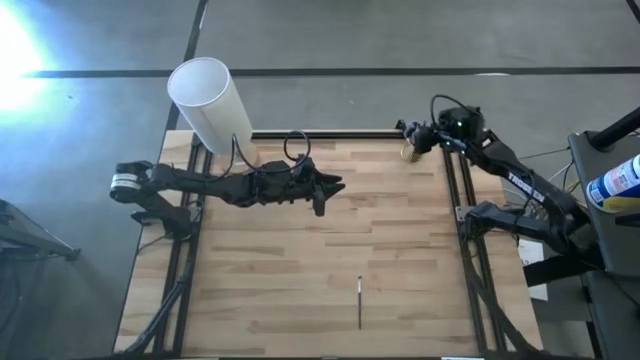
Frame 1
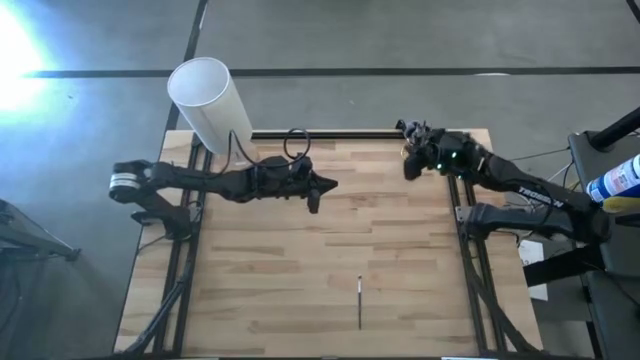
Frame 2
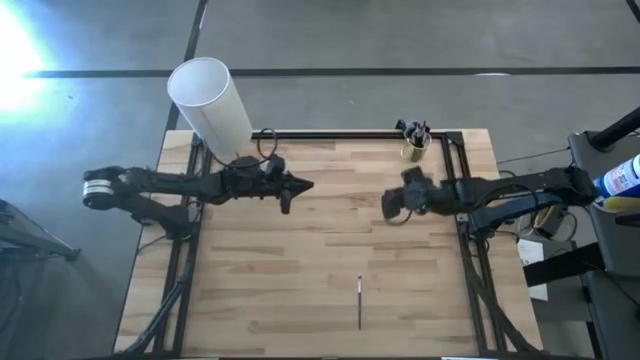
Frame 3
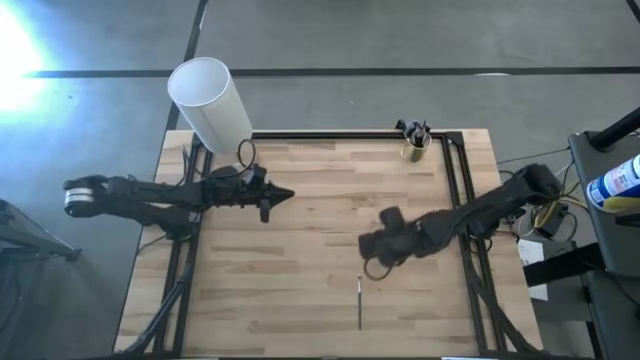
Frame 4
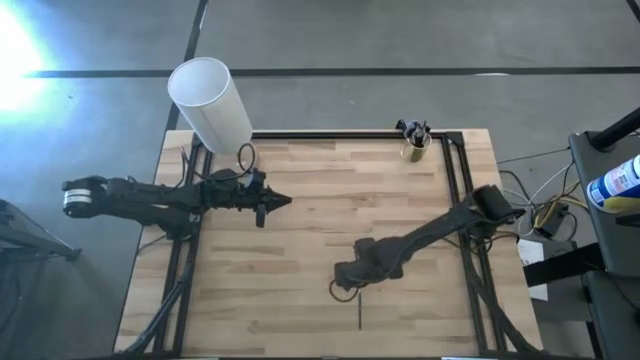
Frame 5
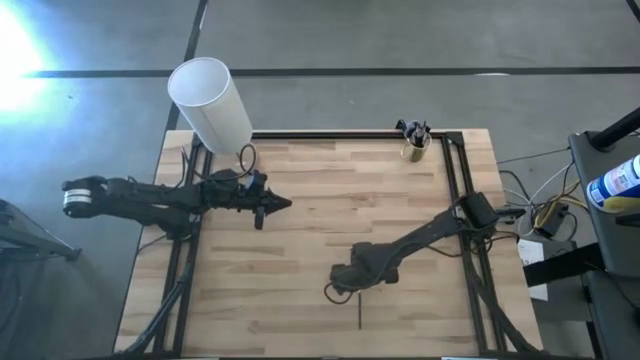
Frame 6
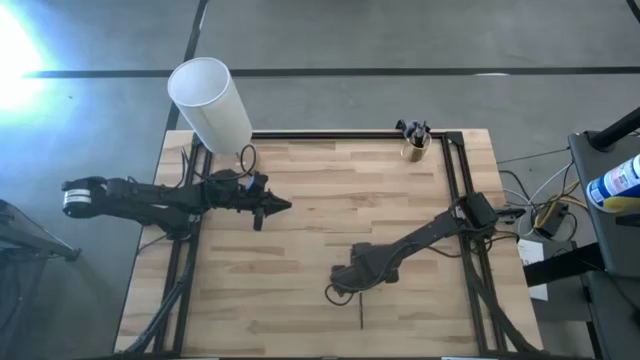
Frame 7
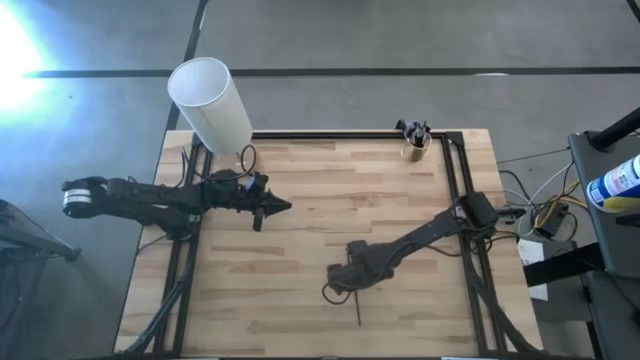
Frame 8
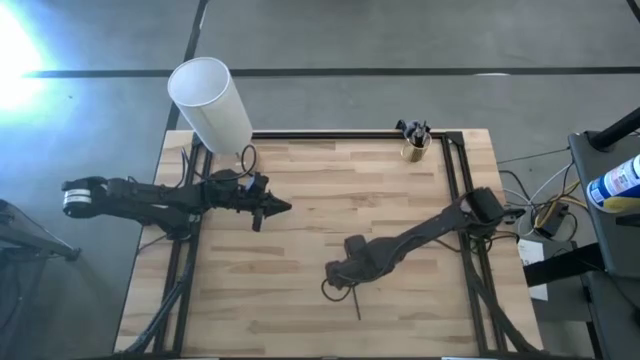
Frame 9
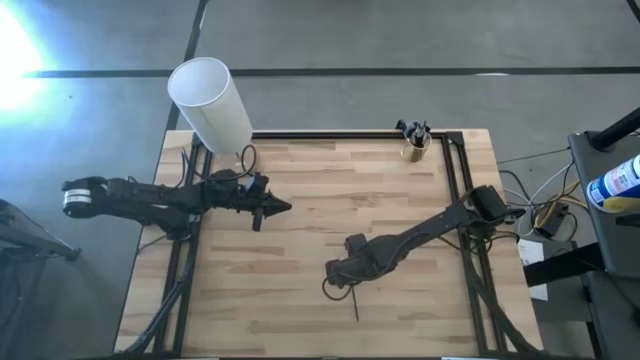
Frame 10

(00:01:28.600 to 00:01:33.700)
Task: Put items in baskets/containers
Put the eyeshadow brush into the yellow container

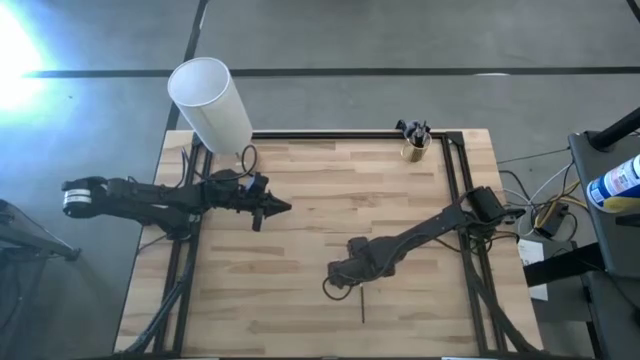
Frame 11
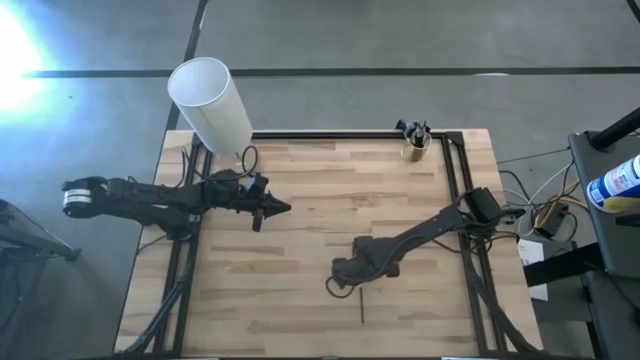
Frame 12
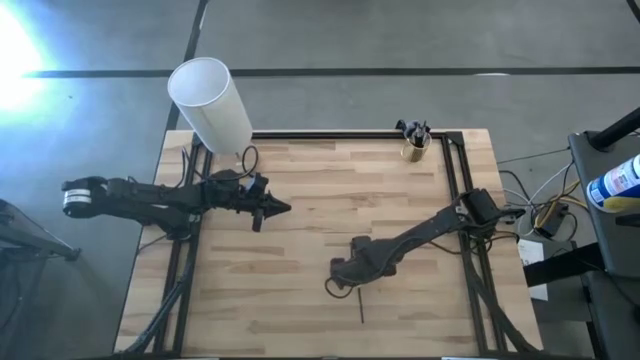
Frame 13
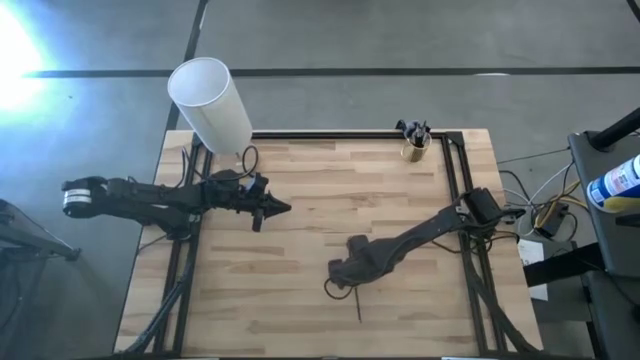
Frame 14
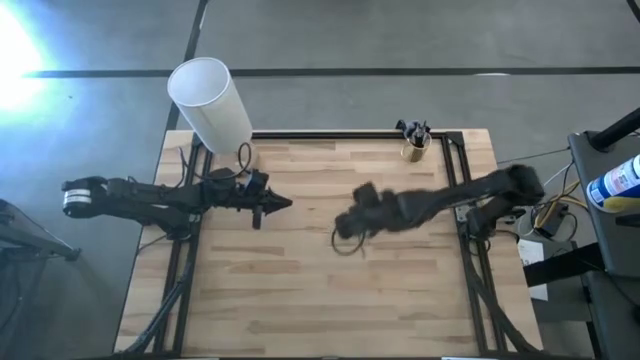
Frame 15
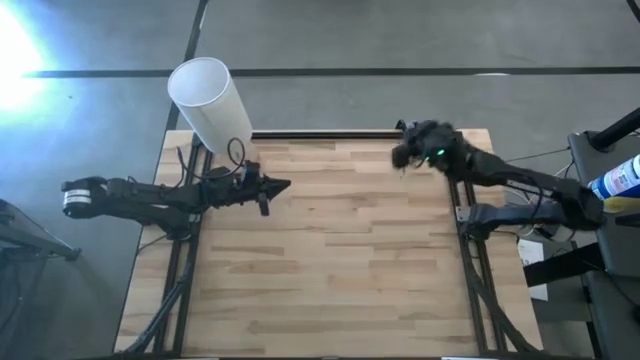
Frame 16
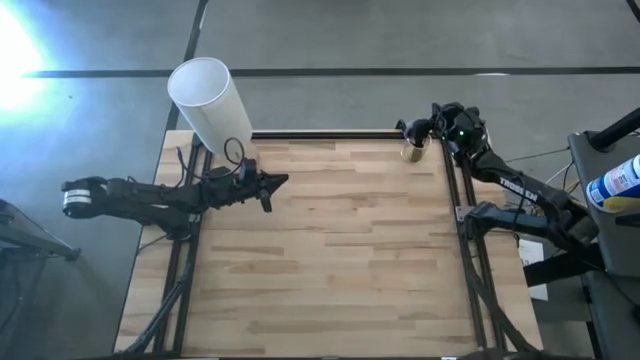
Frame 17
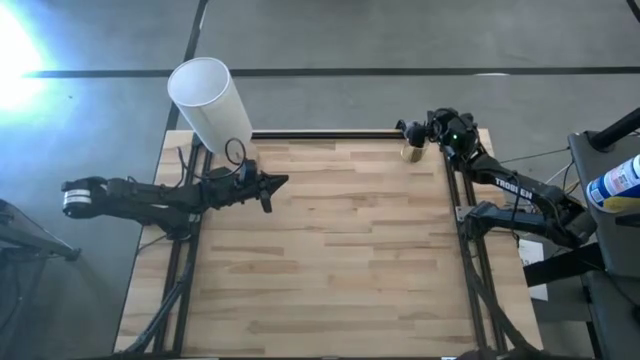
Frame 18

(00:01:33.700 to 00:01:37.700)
Put the eyeshadow brush into the yellow container

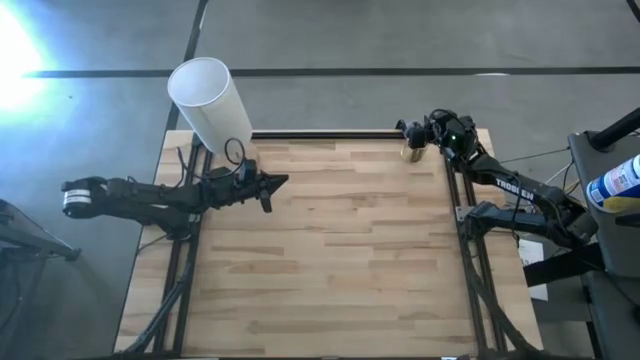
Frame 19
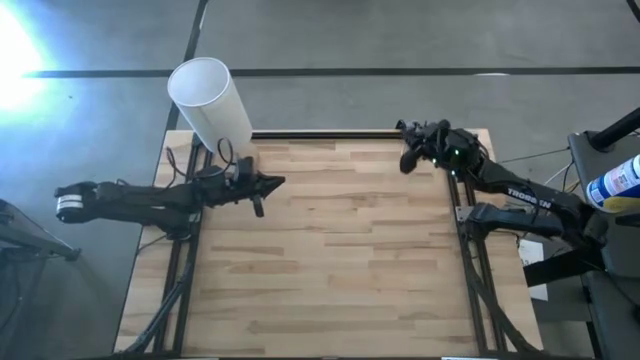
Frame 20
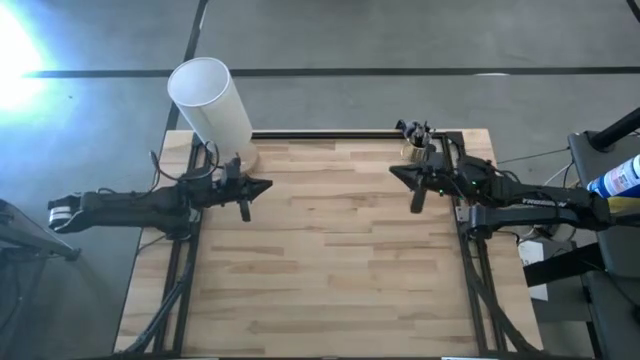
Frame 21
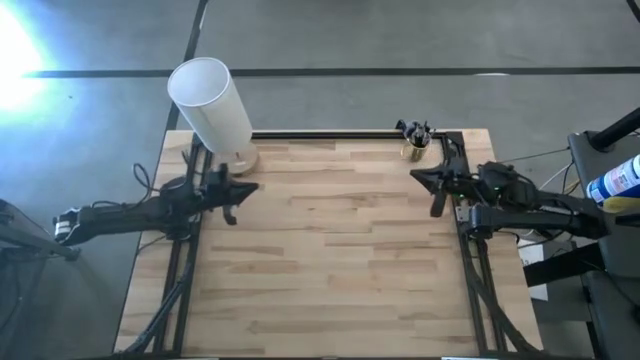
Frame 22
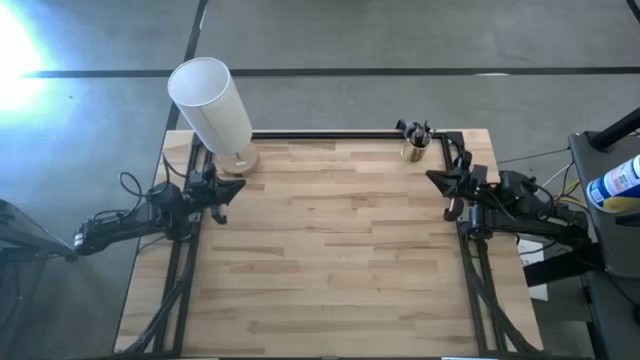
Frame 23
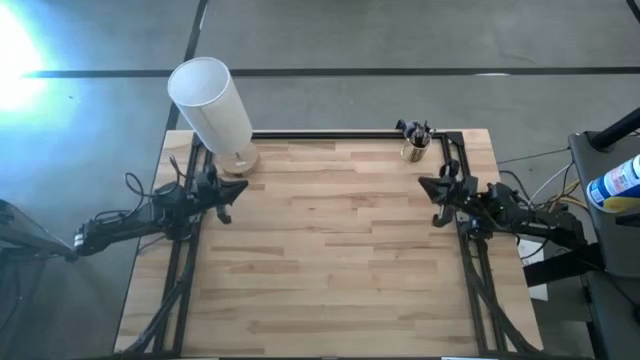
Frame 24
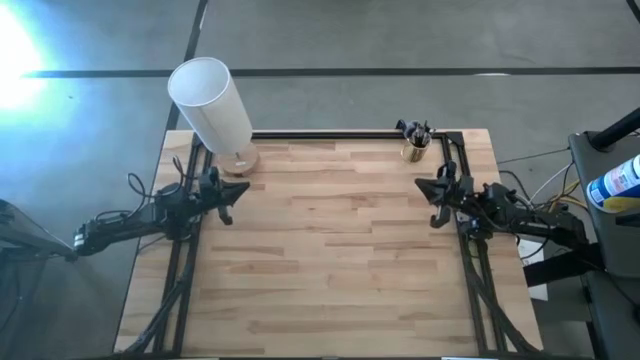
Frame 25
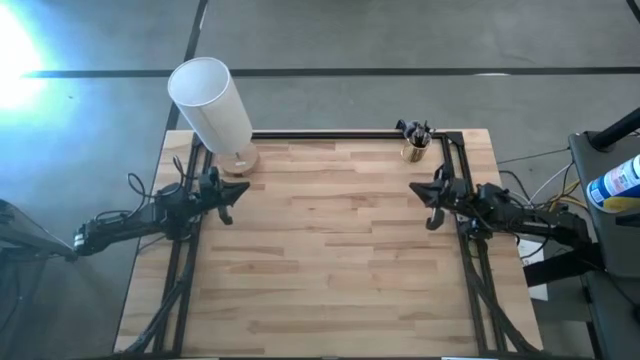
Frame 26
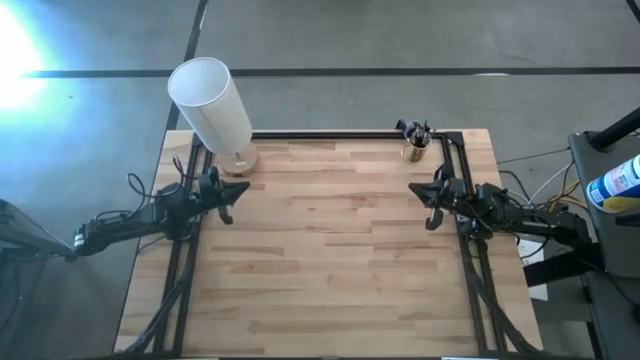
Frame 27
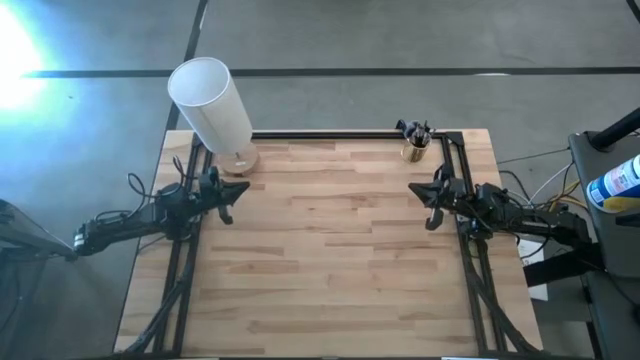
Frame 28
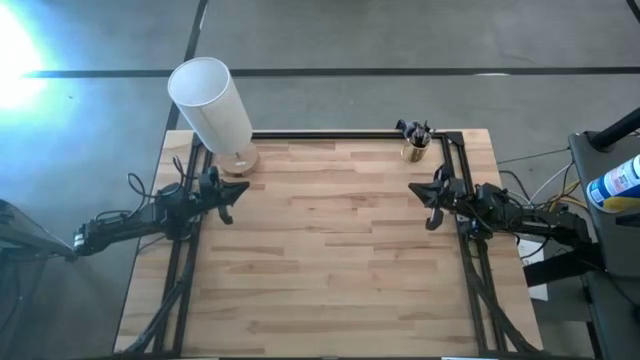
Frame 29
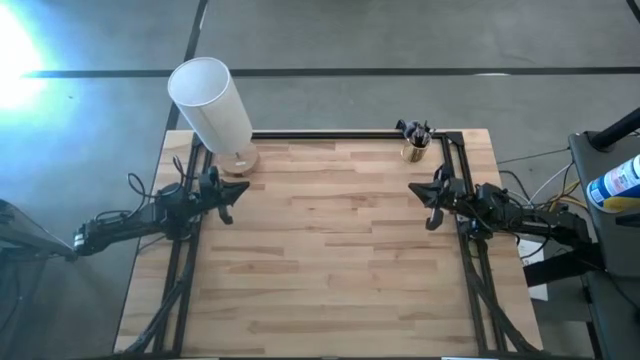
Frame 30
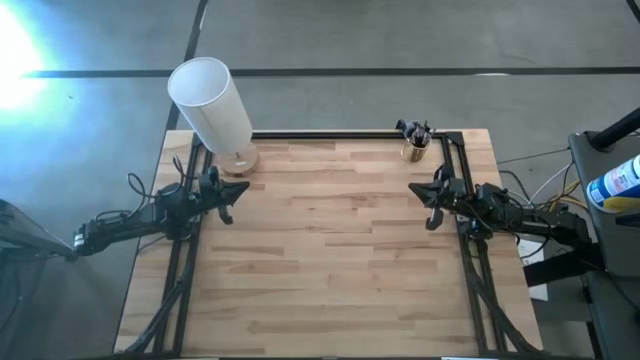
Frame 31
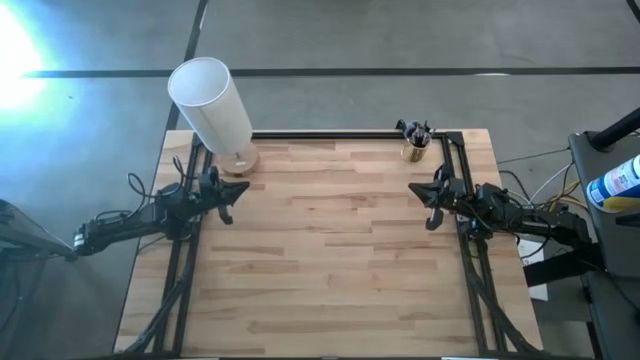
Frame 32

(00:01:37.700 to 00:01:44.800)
Return to Home Position

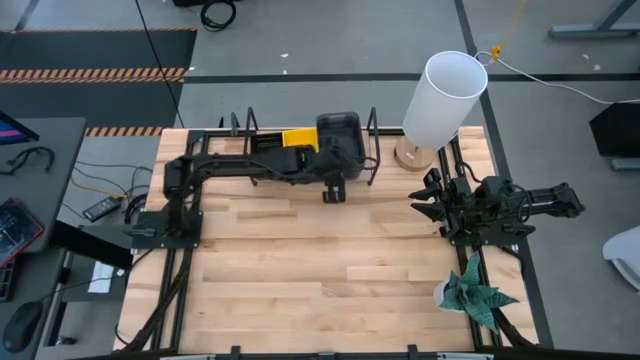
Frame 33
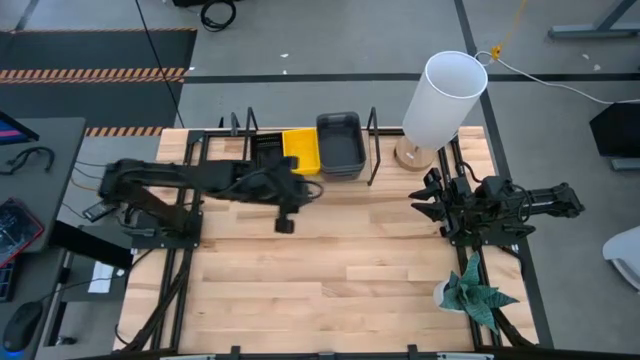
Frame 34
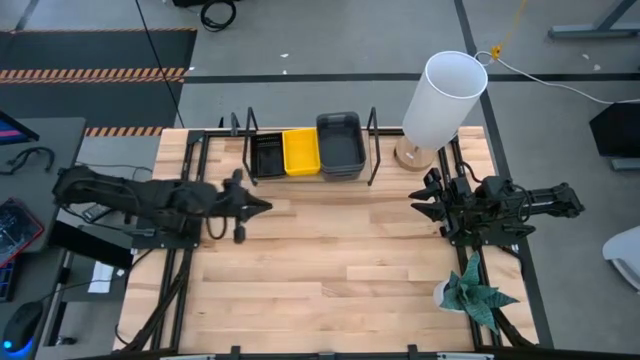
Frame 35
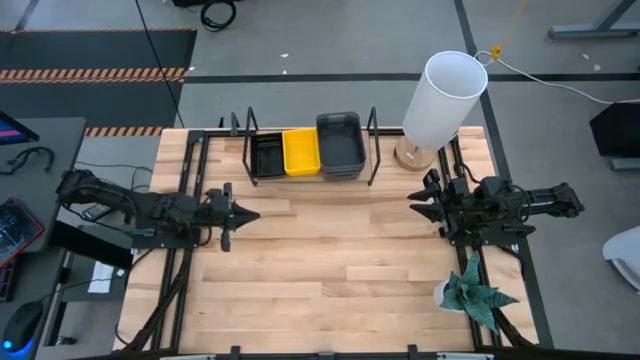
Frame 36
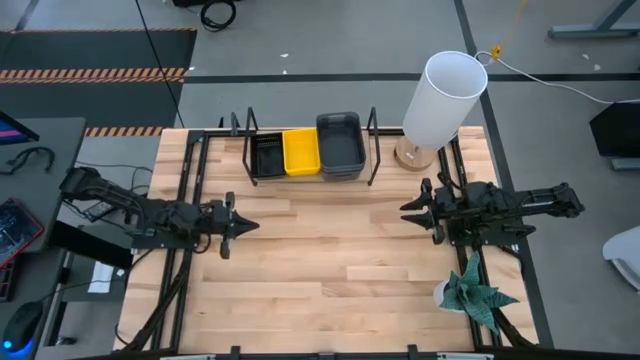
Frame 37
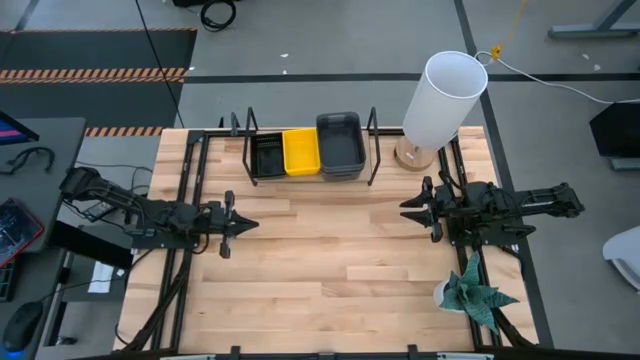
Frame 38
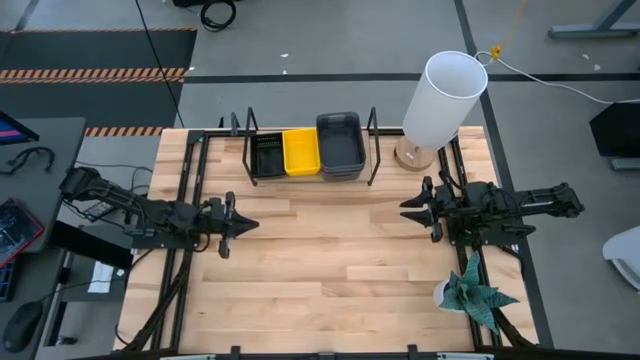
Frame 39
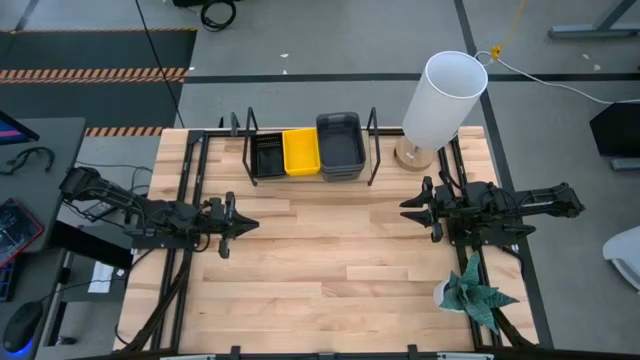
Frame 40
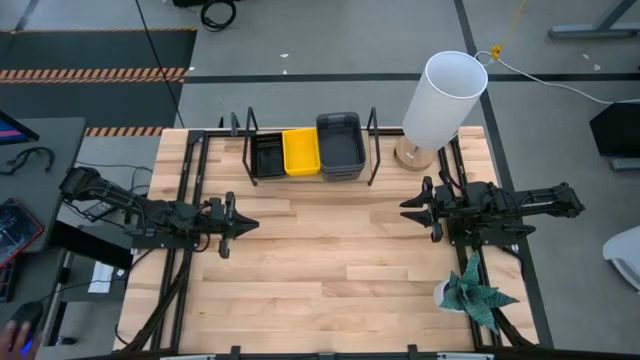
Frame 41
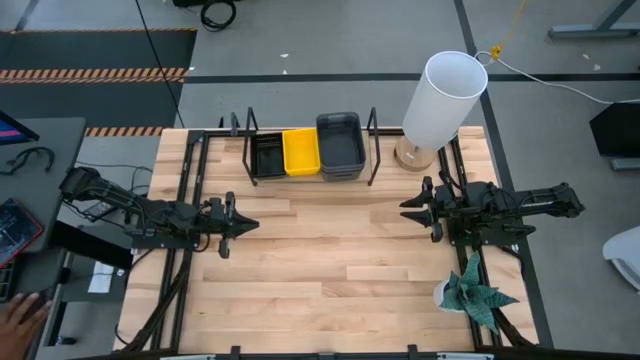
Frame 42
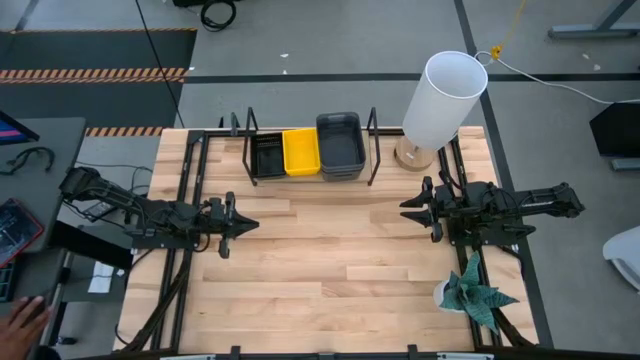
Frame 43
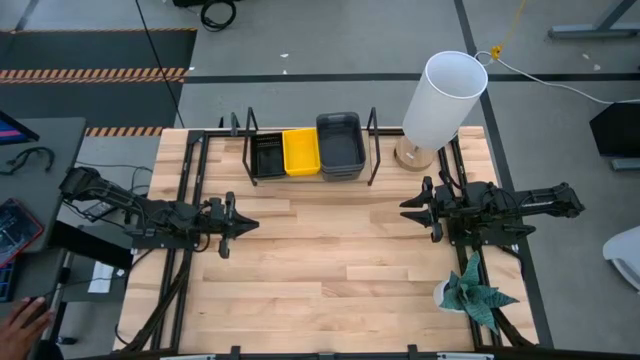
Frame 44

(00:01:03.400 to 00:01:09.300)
Task: Stack baskets on shelf by color
Return to Home Position
